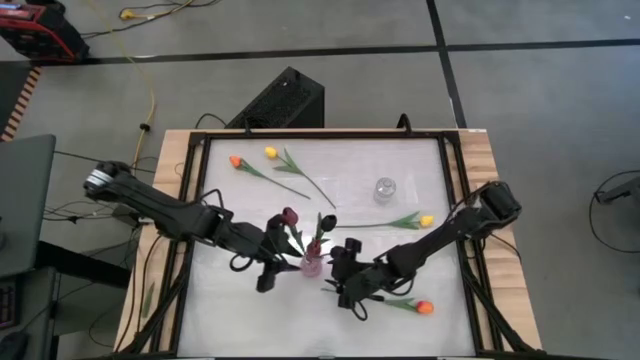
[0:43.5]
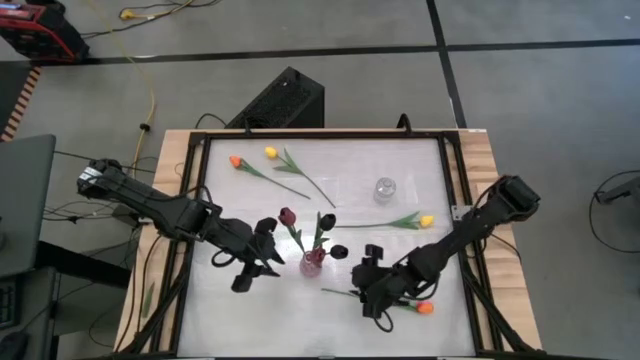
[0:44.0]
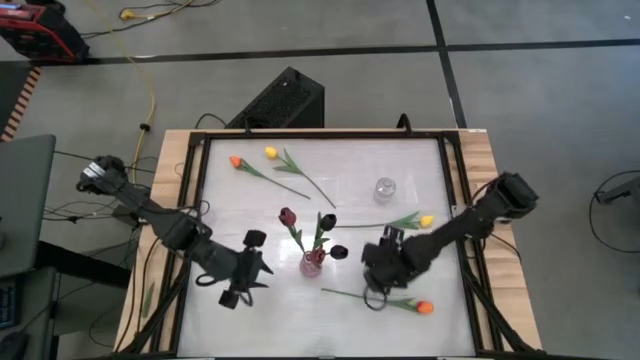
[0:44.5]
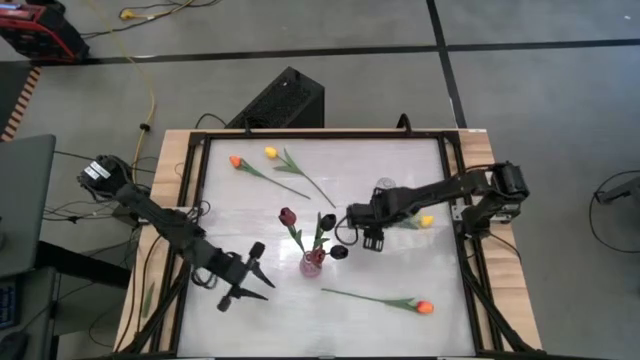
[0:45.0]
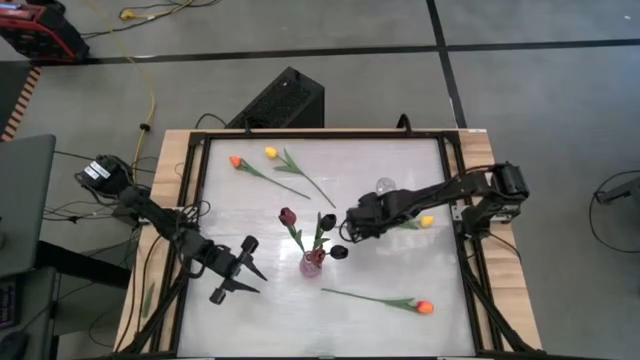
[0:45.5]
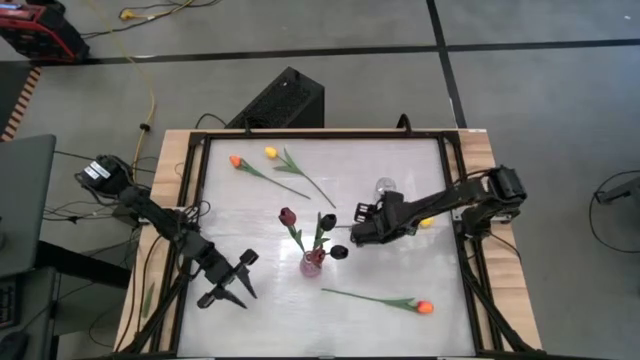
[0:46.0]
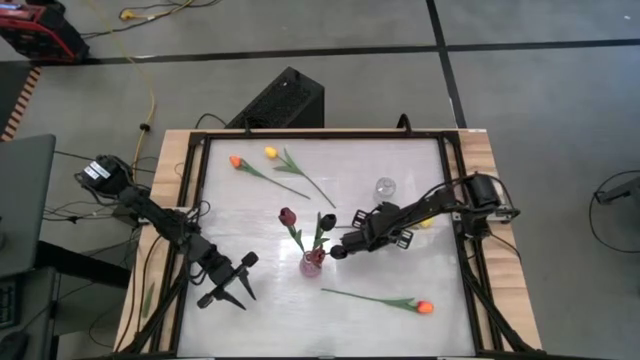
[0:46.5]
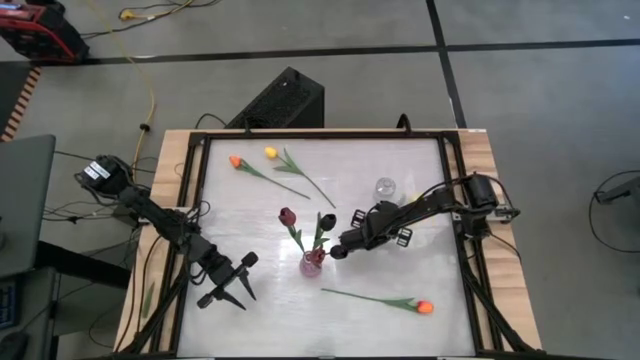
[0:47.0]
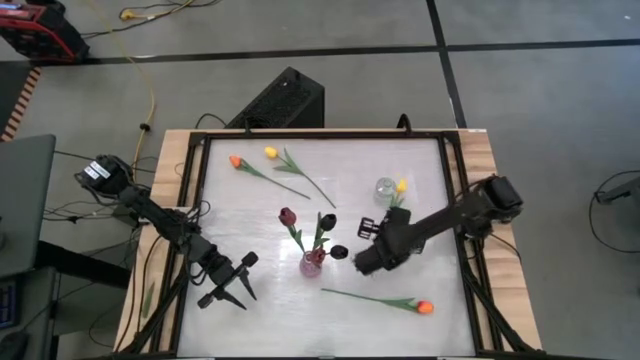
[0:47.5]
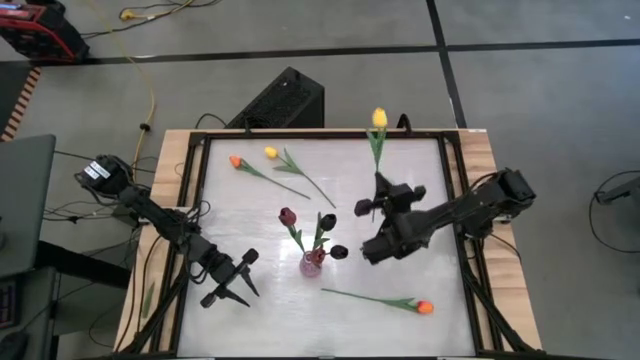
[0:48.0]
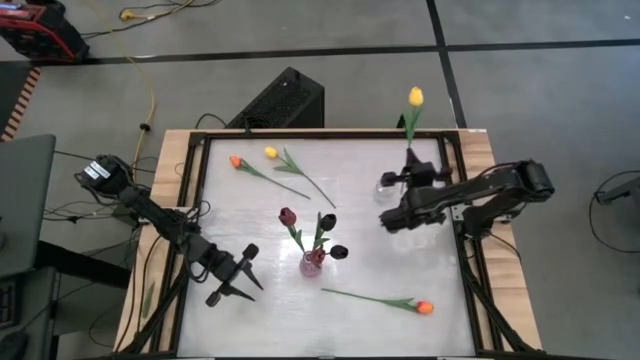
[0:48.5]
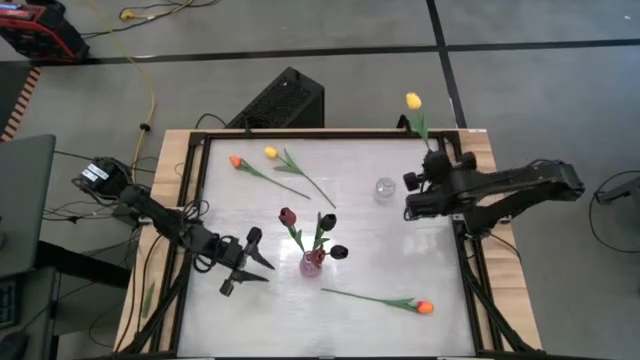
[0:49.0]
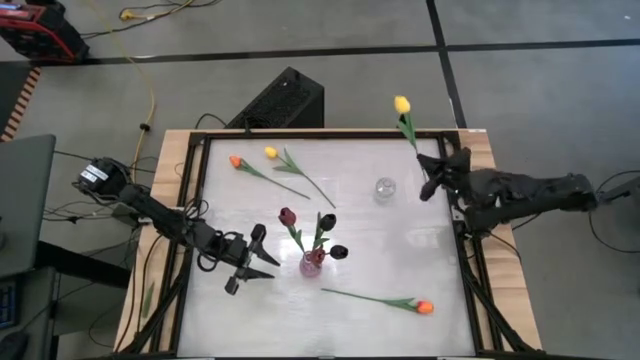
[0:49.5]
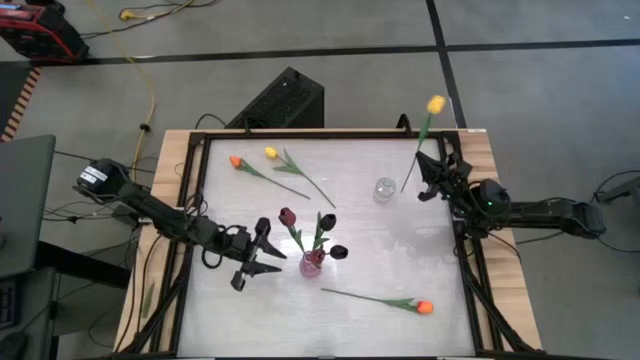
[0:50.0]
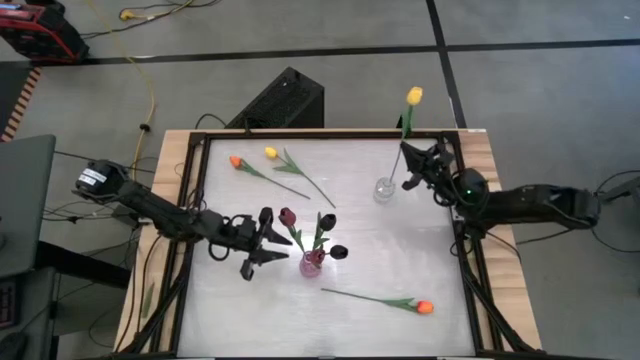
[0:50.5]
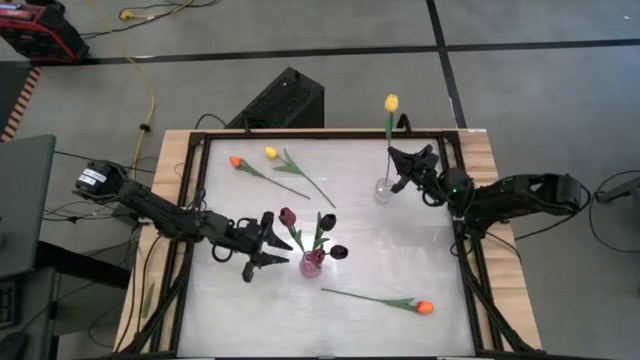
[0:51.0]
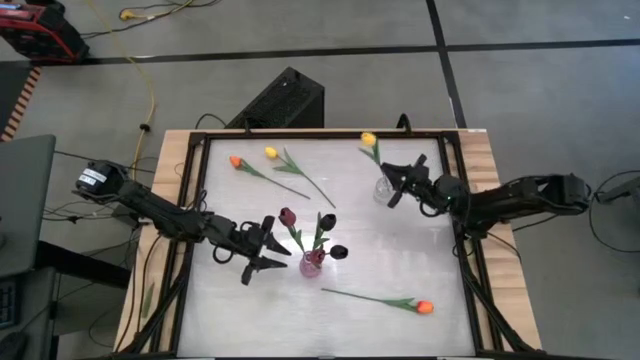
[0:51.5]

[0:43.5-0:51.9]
Task: Sort flowers into vase by color
Put the bottom yellow flower into the transparent vase

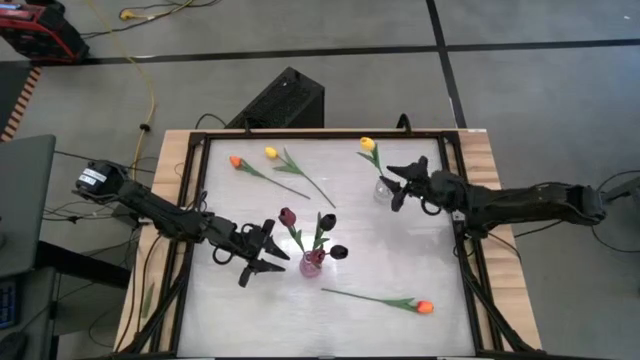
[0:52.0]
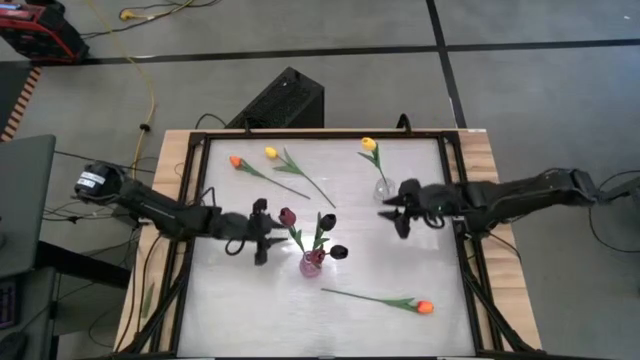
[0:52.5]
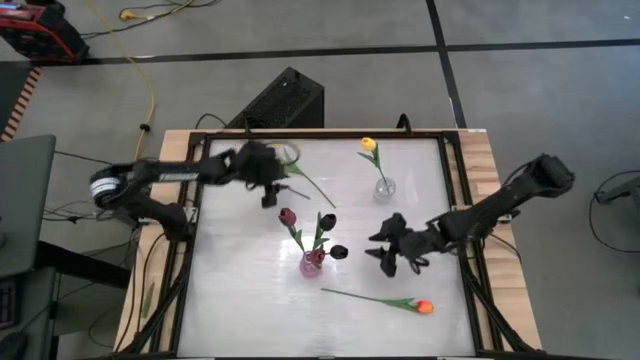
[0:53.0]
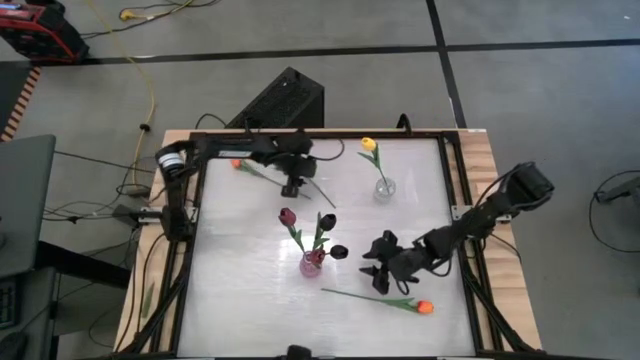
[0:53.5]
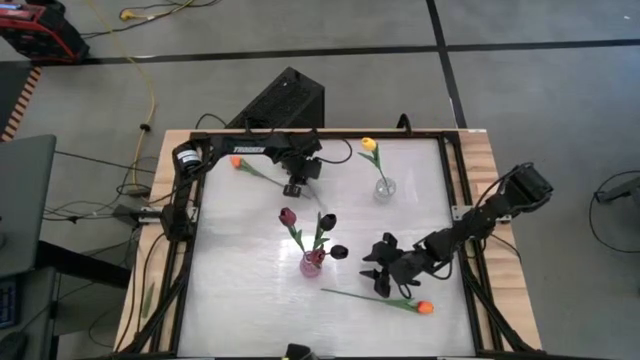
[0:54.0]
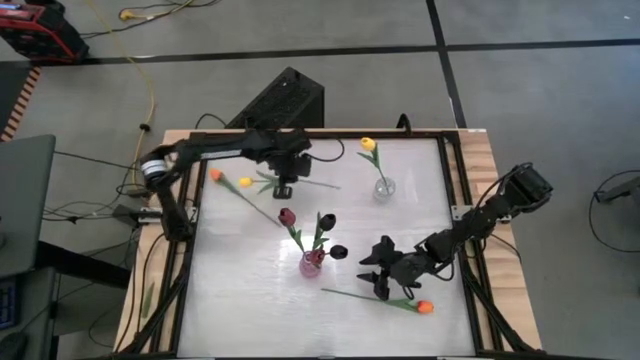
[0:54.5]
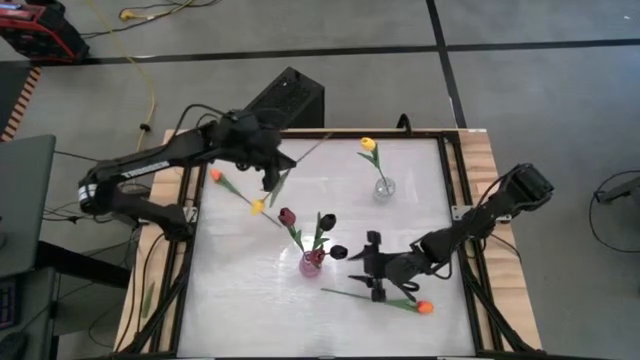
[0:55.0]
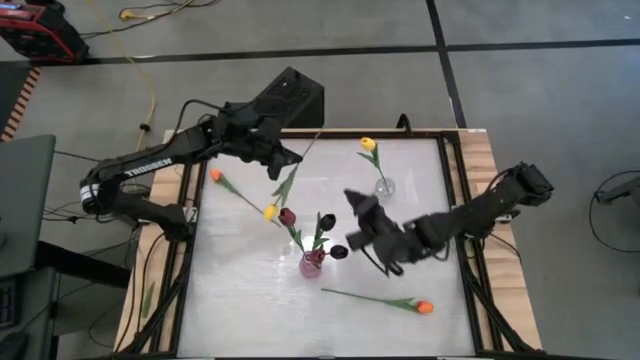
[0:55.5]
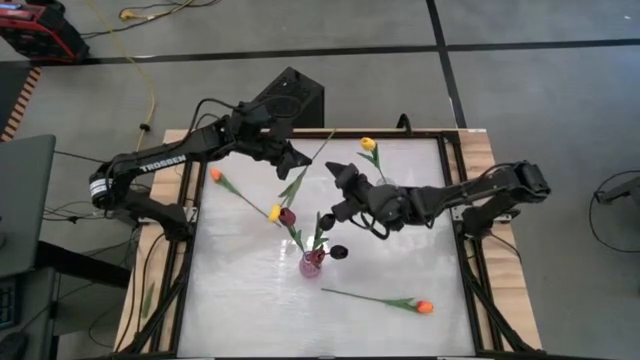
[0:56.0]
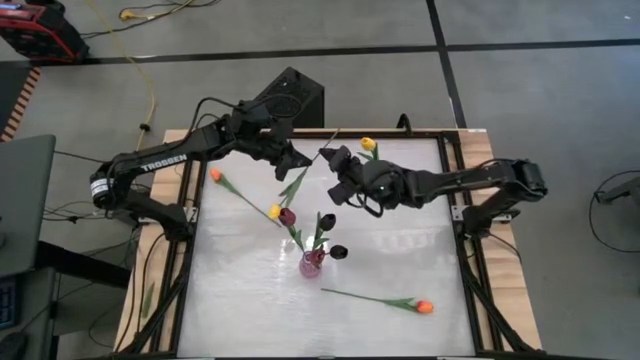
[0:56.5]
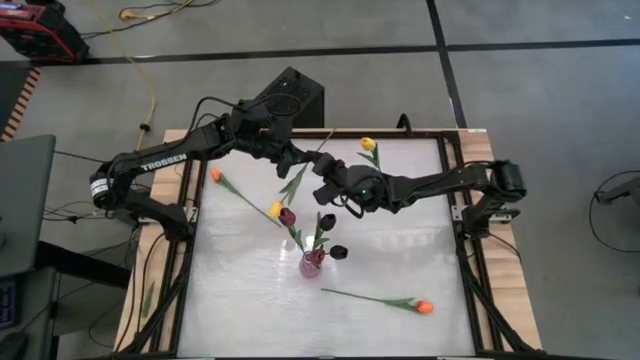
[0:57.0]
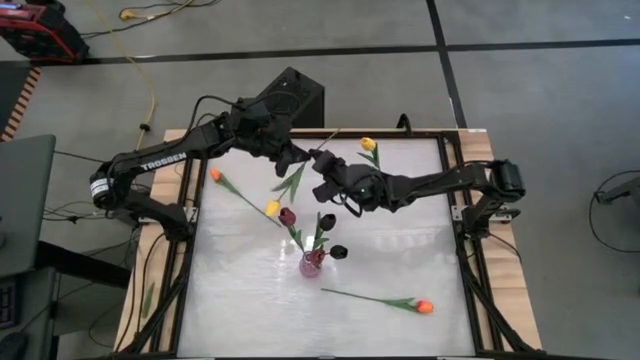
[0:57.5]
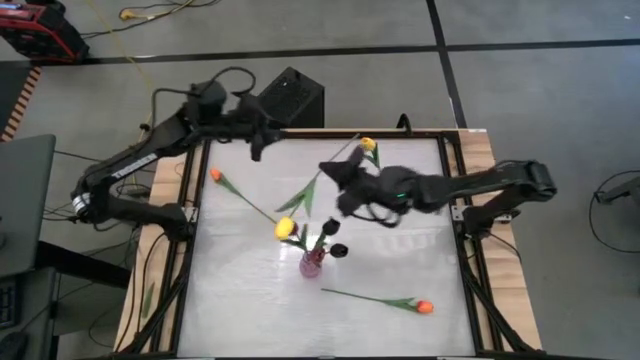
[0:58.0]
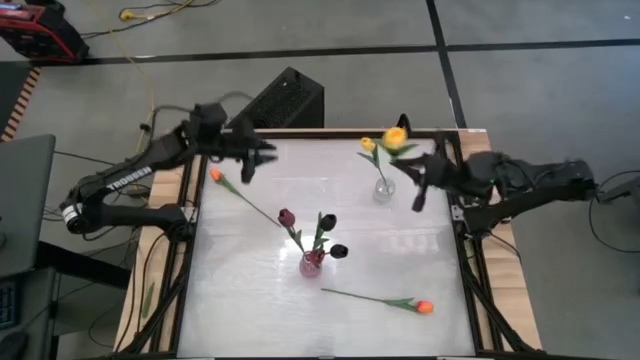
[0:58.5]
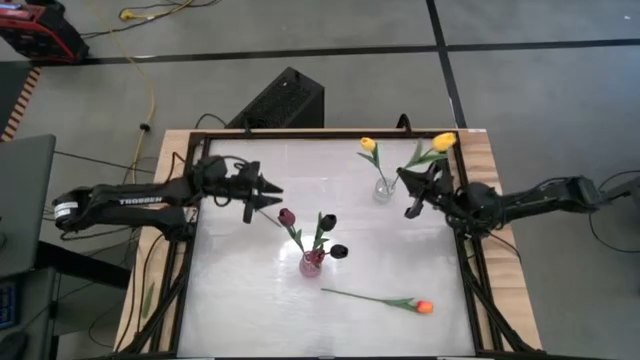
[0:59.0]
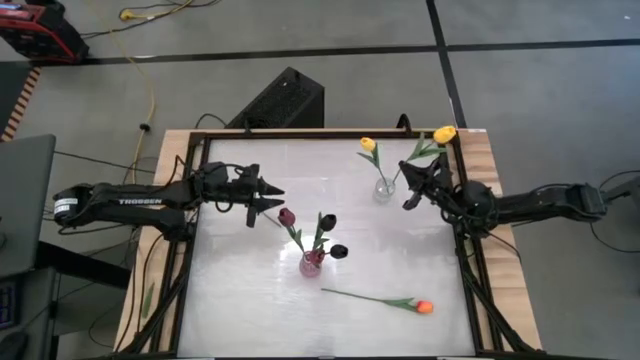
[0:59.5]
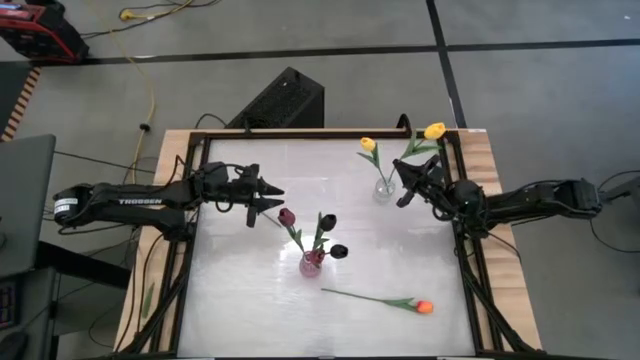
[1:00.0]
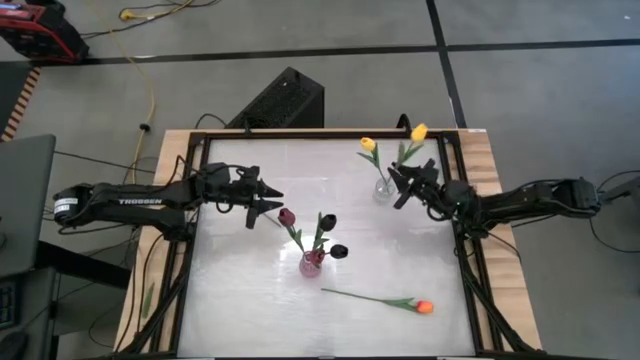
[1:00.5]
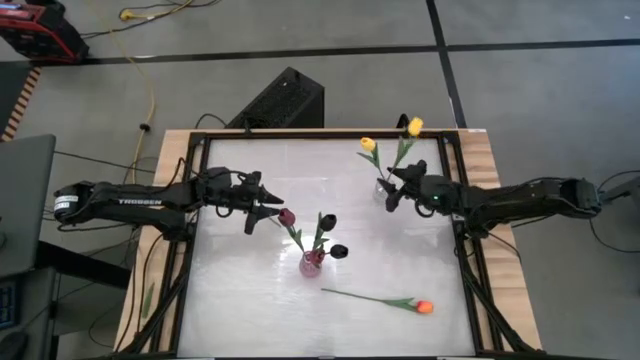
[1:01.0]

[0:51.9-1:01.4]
Put the yellow flower into the transparent vase

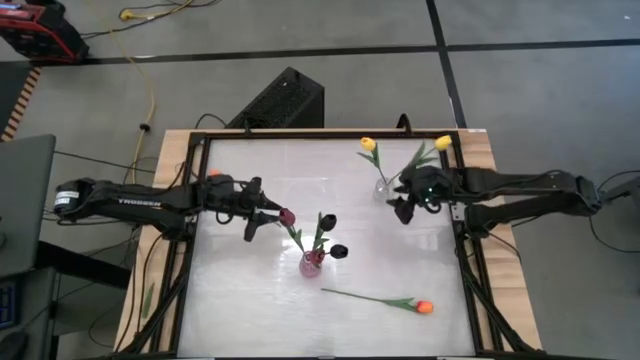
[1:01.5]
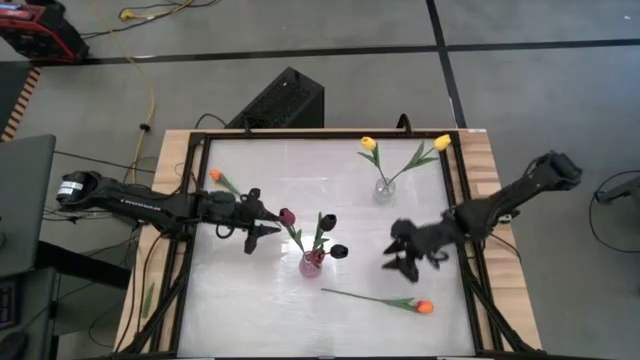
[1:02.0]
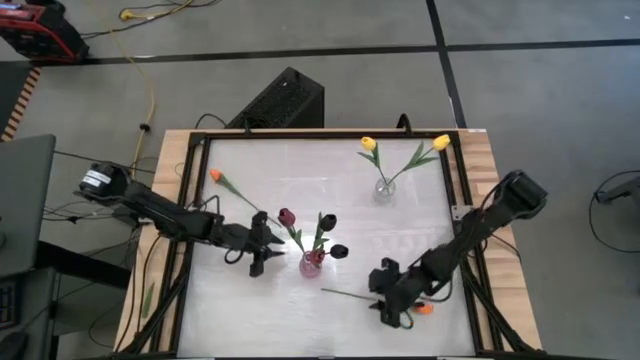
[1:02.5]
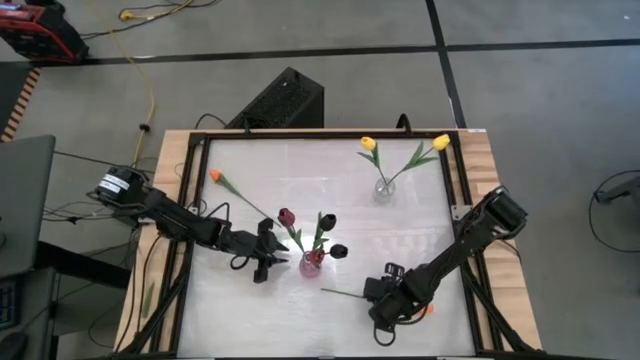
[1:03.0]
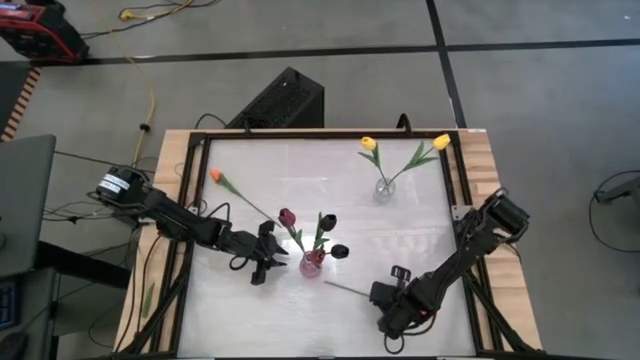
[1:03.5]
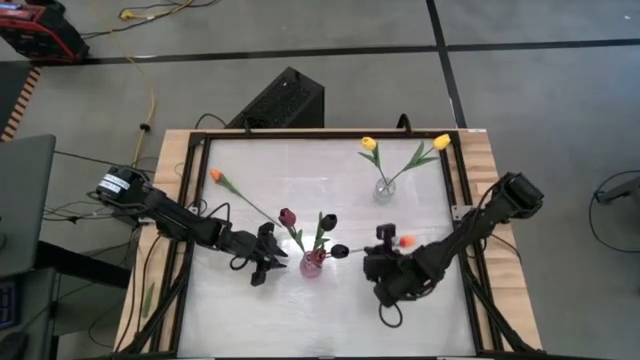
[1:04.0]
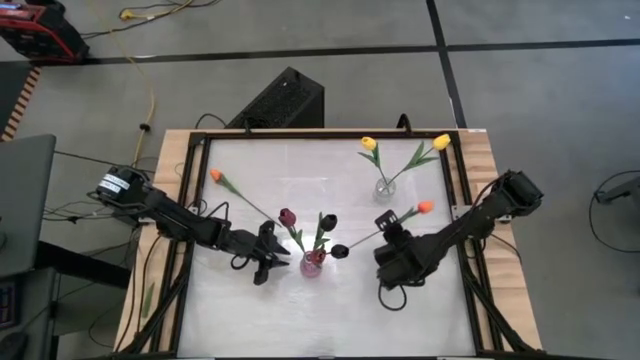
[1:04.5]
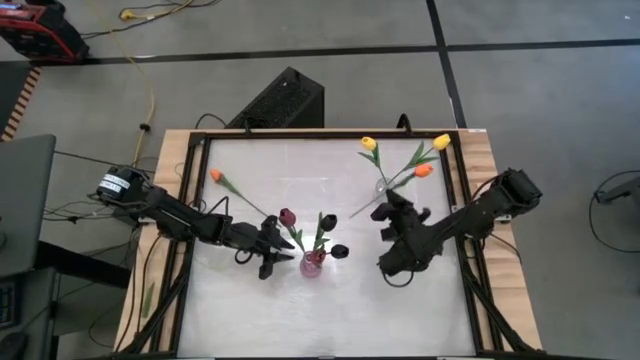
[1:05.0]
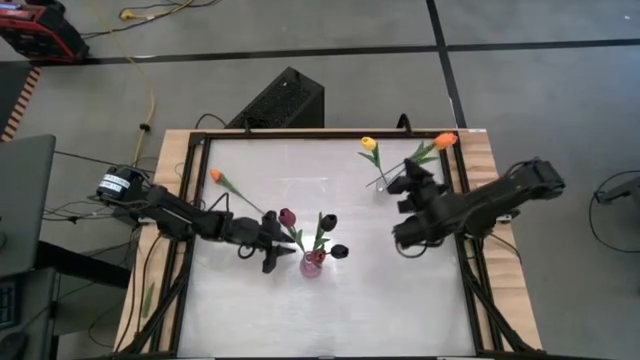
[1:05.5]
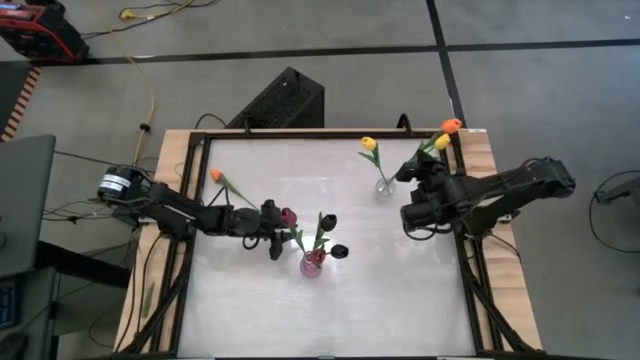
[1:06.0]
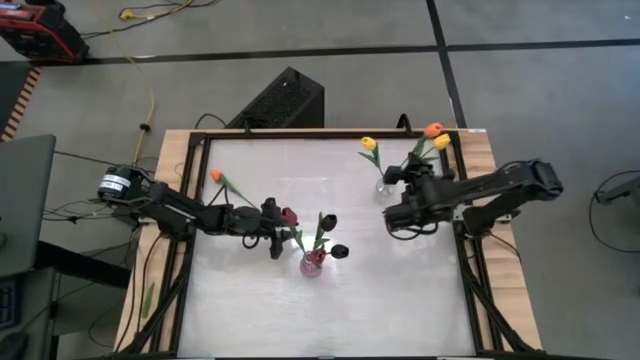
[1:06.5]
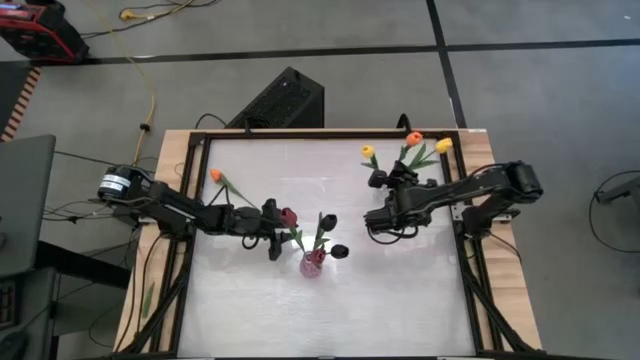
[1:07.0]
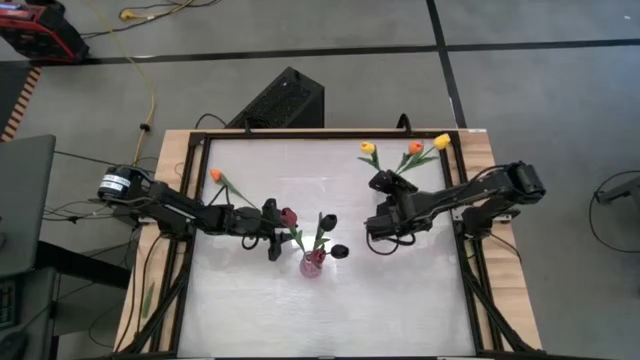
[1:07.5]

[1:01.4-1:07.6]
Put the bottom orange flower into the transparent vase
